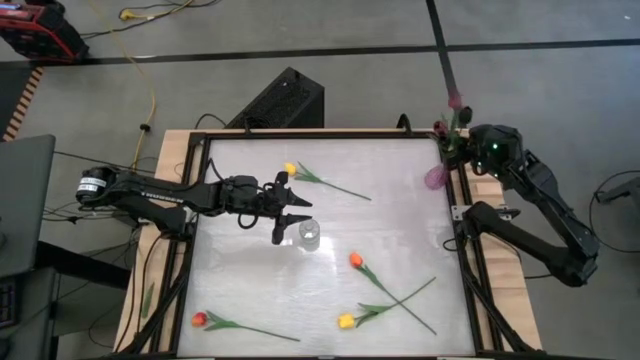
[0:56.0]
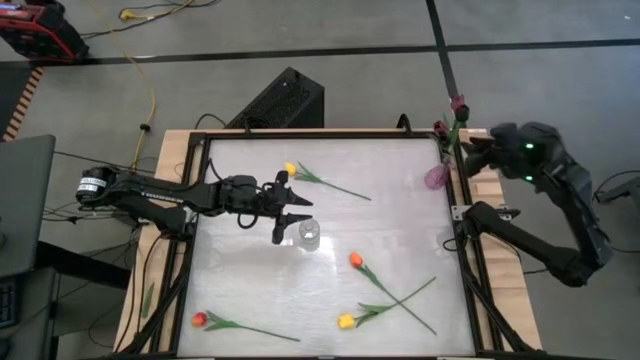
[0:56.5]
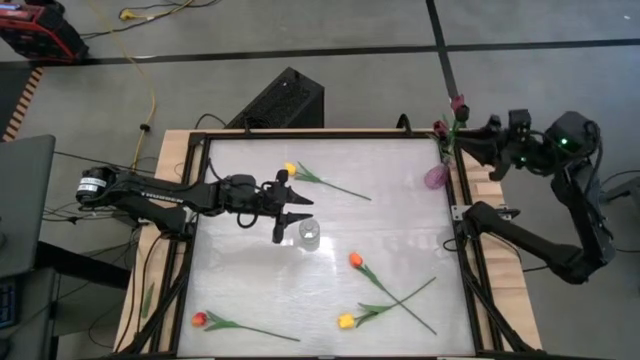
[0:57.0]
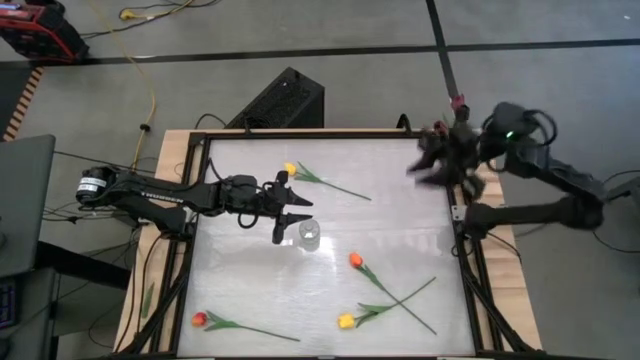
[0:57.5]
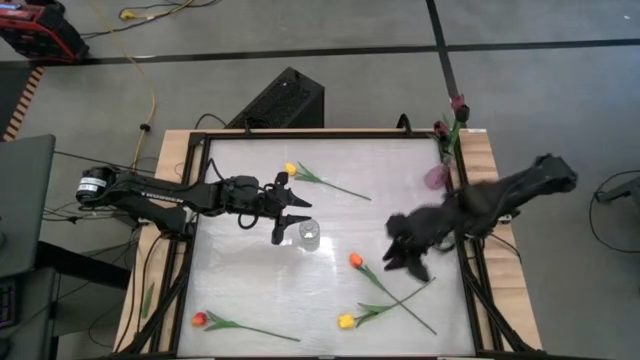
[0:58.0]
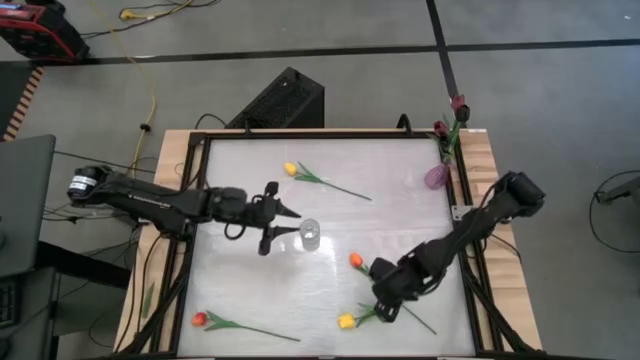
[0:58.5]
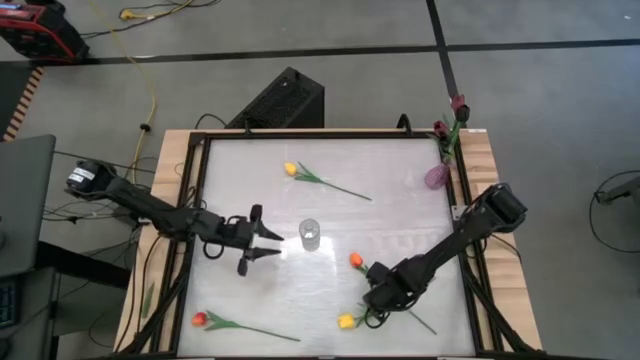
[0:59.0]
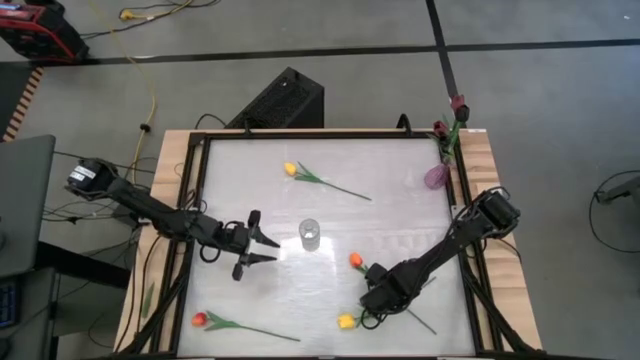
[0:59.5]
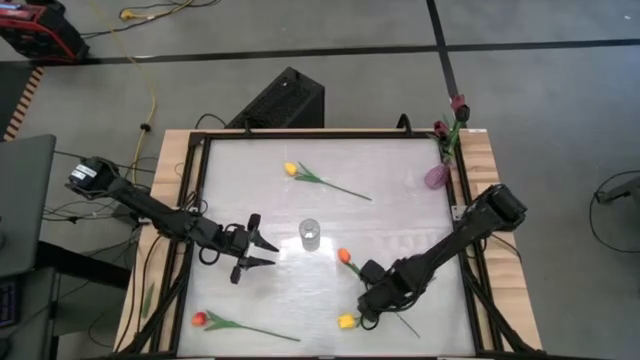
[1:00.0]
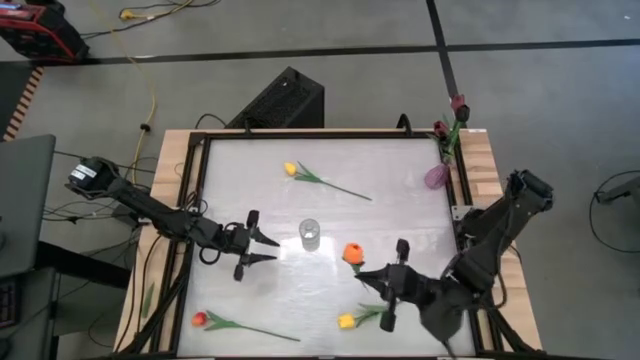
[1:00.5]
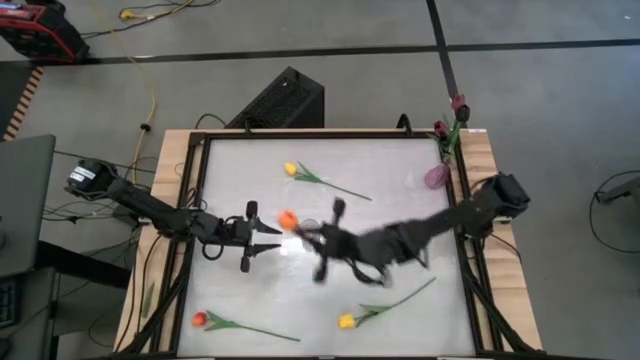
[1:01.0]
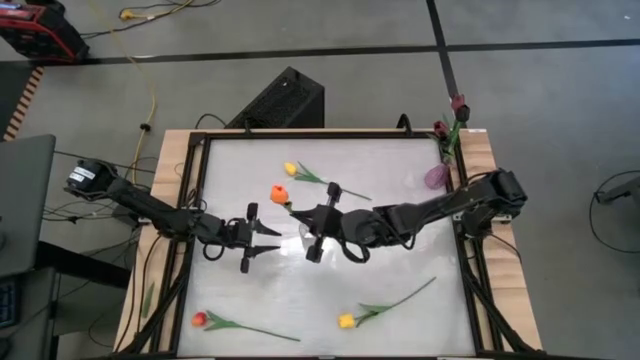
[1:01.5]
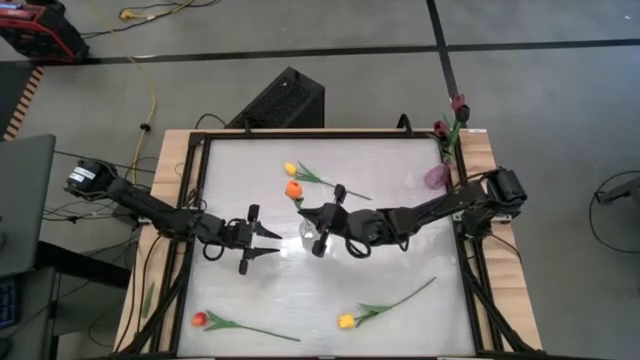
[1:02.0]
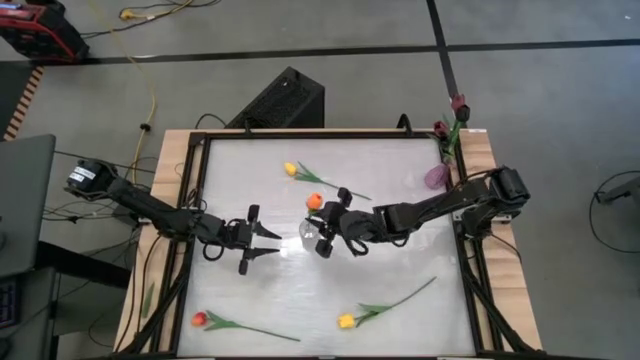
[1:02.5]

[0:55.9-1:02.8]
Task: Sort flowers into vase by color
Put the right orange flower into the transparent vase

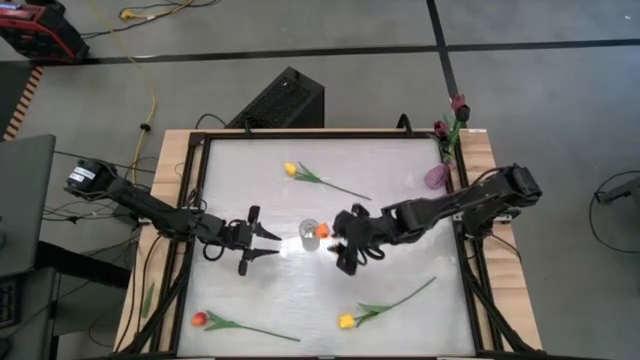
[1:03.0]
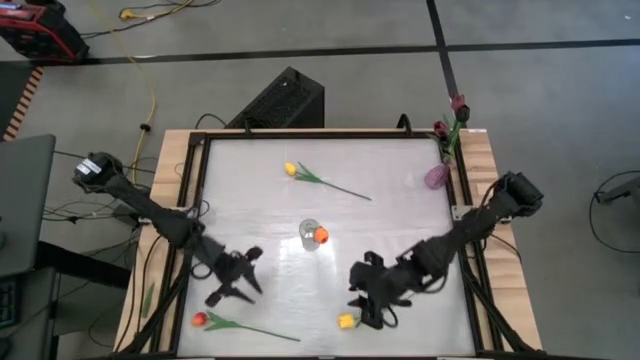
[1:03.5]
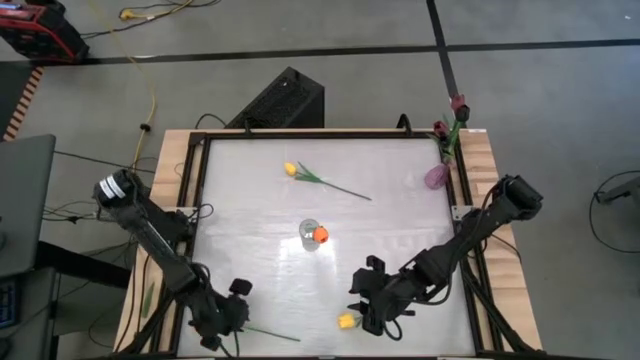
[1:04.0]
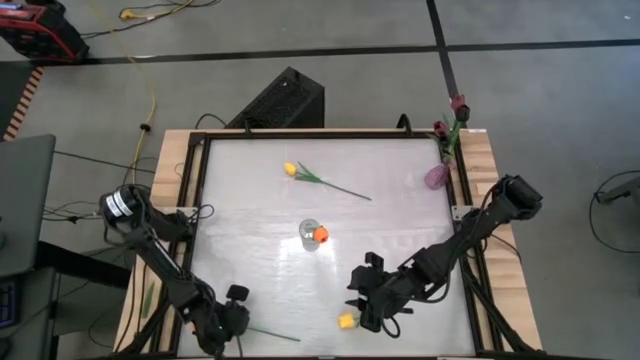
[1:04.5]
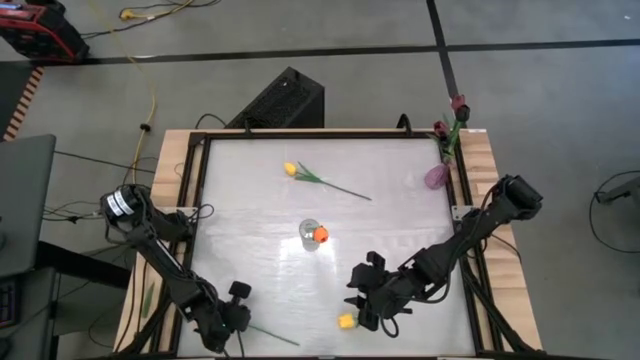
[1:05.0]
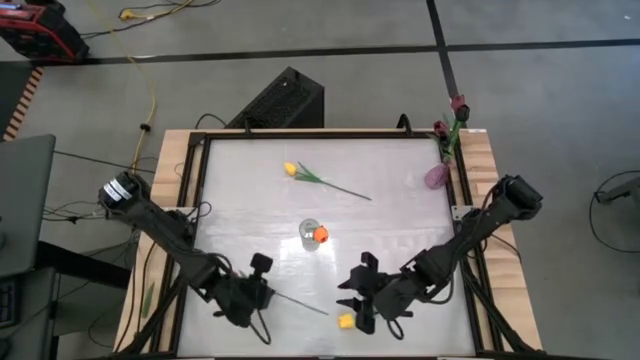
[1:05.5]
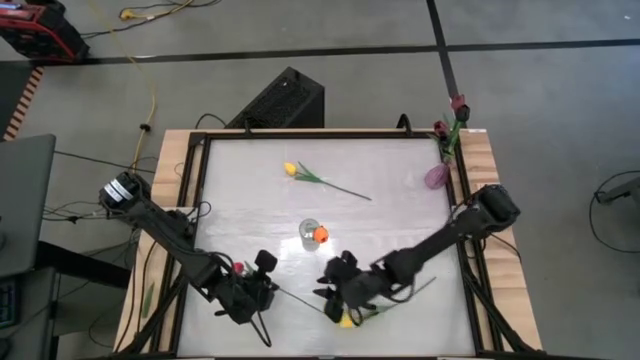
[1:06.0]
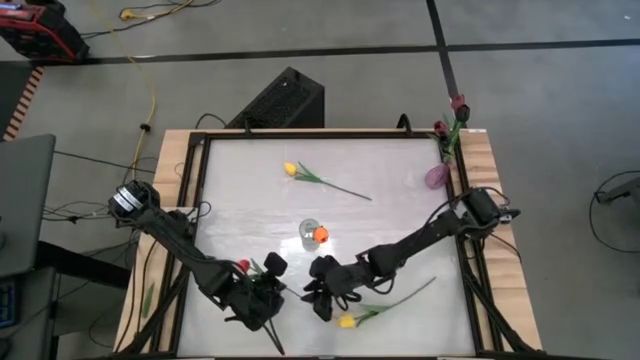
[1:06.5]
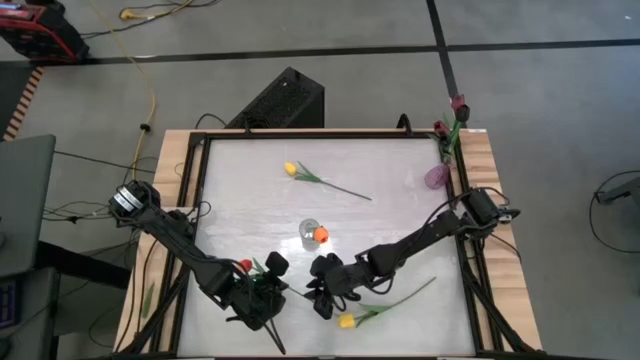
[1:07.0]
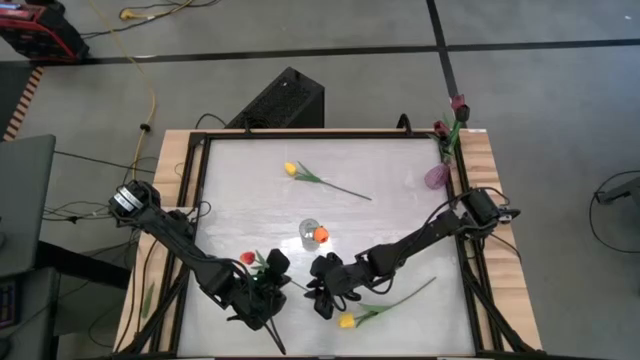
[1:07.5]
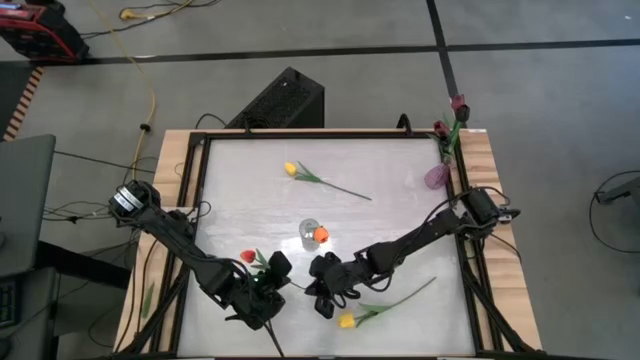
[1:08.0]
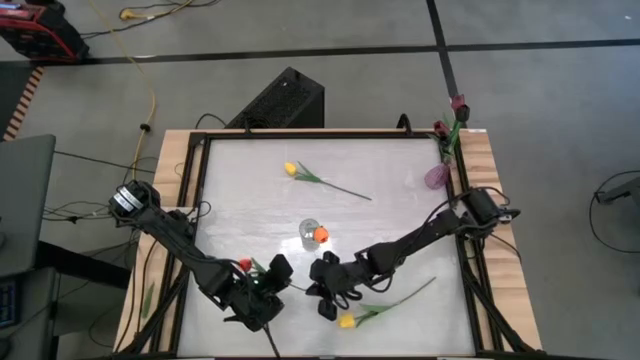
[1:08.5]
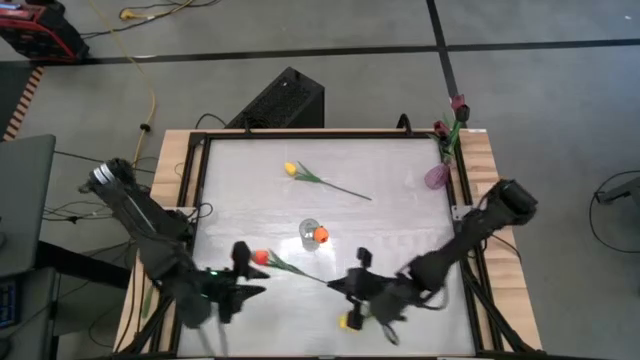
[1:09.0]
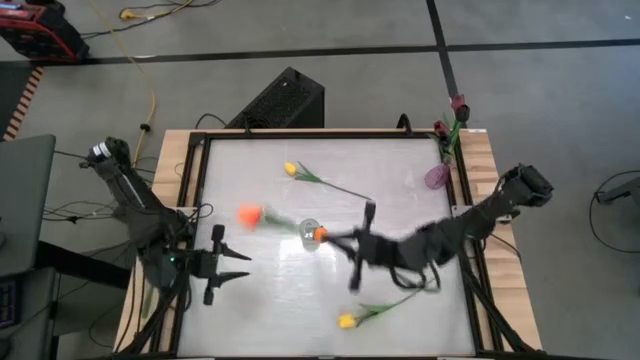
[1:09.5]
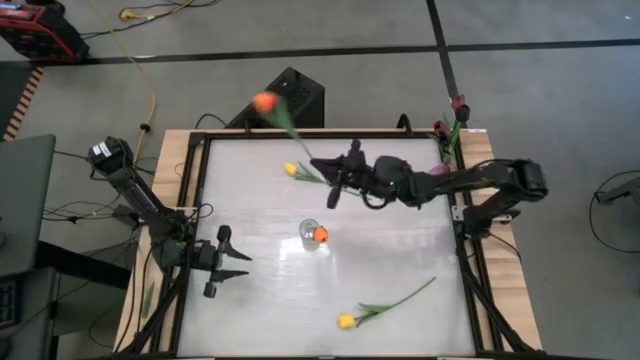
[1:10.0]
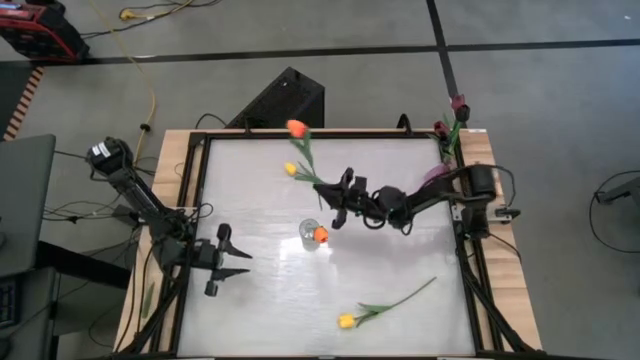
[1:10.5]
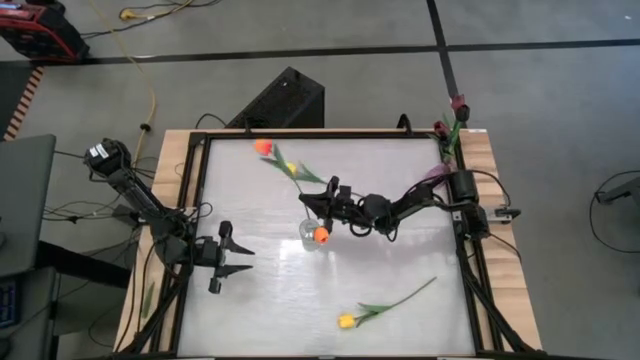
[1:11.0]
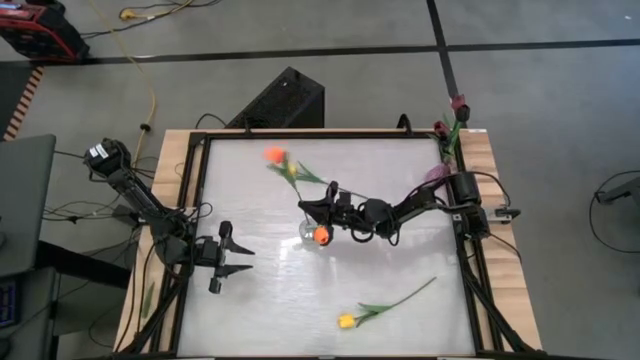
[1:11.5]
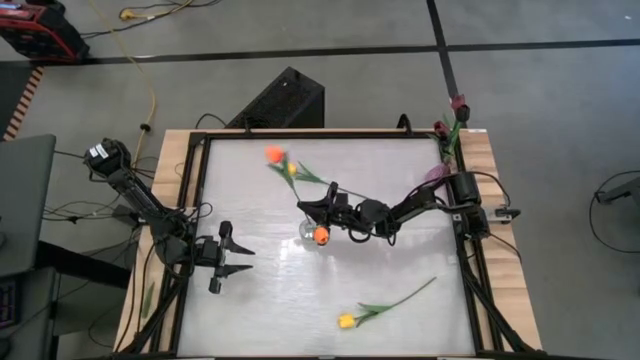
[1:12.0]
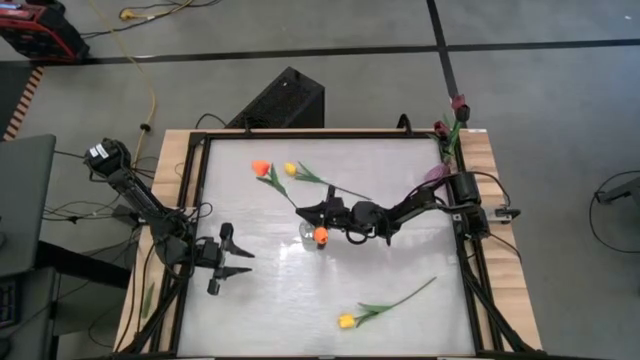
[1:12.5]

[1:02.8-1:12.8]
Put the orange flower into the transparent vase

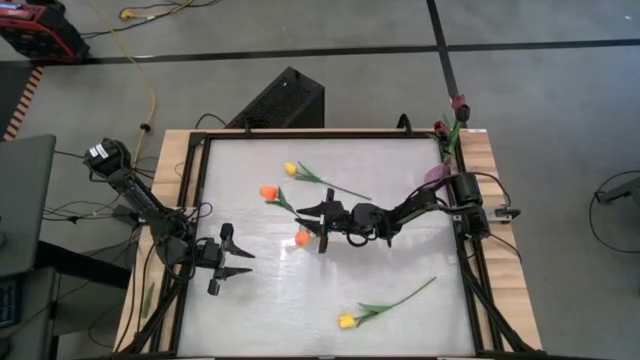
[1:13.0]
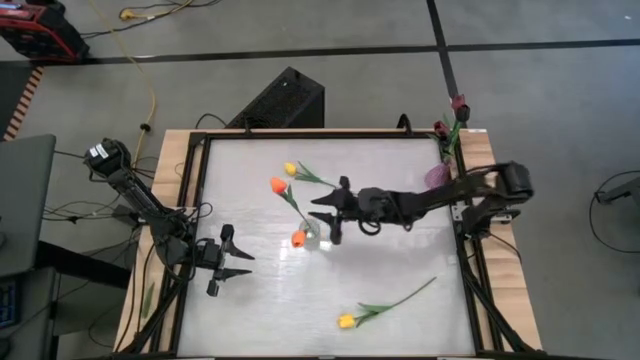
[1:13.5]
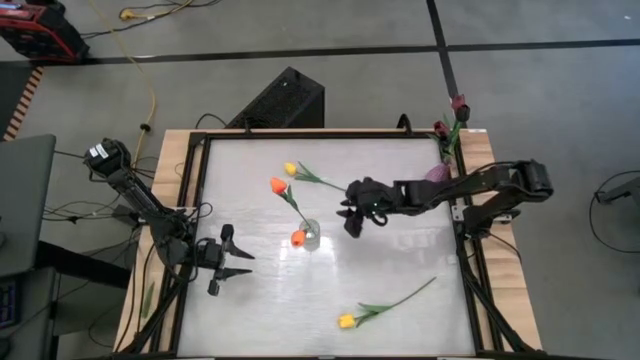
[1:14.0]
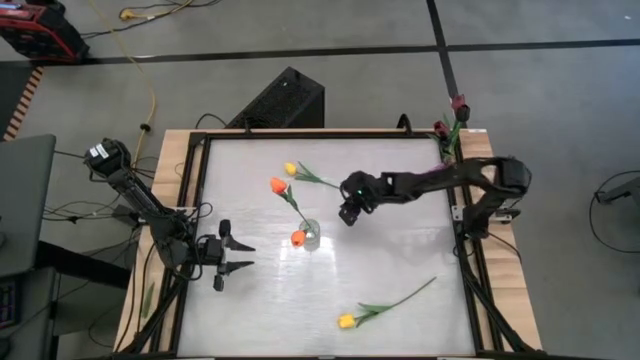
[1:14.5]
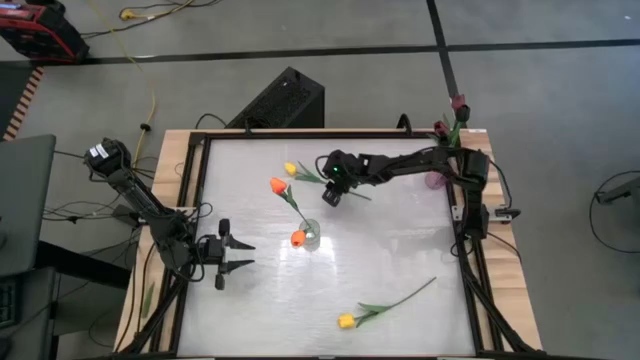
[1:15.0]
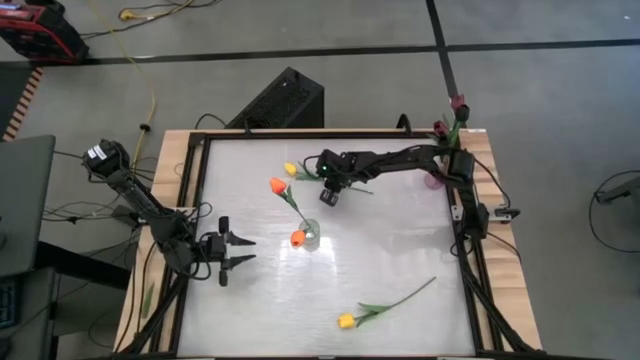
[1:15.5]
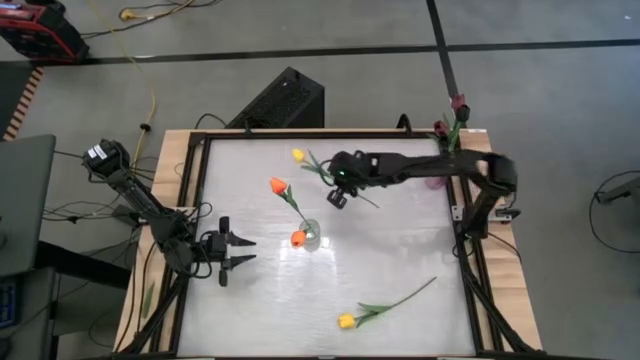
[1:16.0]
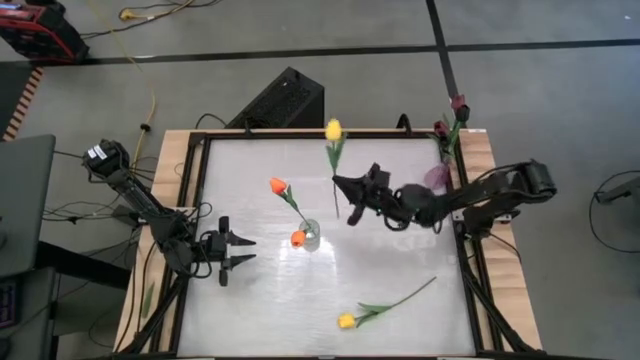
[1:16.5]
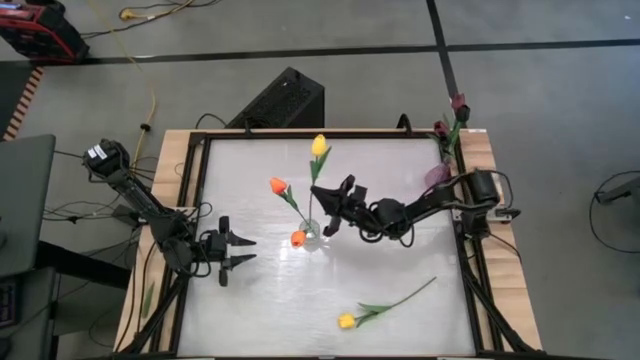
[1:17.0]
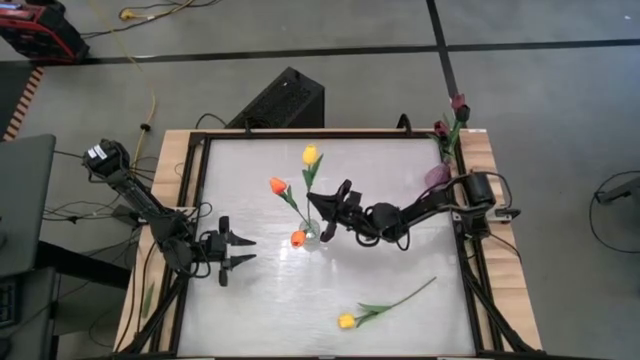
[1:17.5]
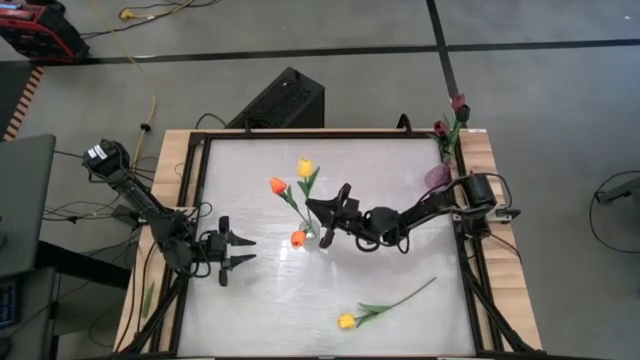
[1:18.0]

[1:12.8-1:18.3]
Put the top yellow flower into the transparent vase
